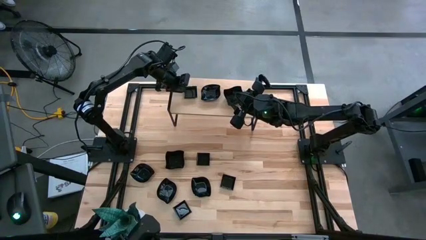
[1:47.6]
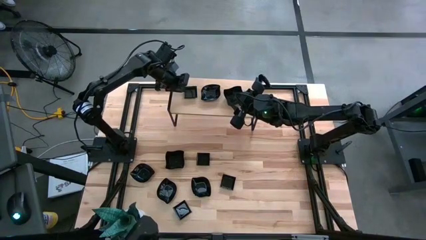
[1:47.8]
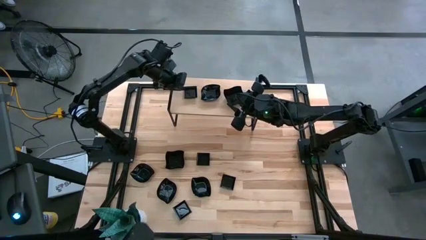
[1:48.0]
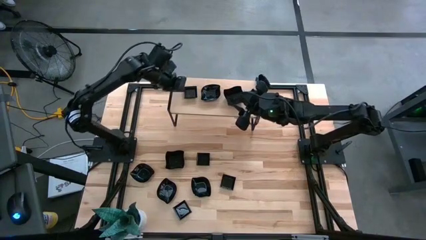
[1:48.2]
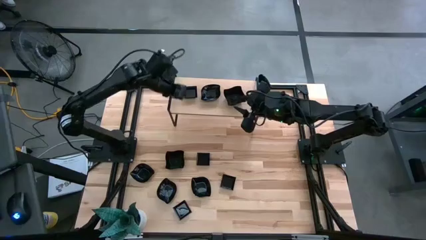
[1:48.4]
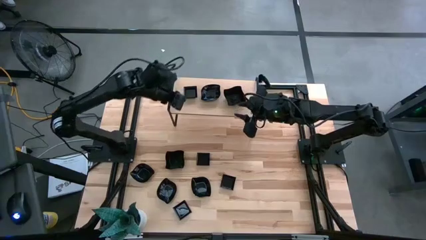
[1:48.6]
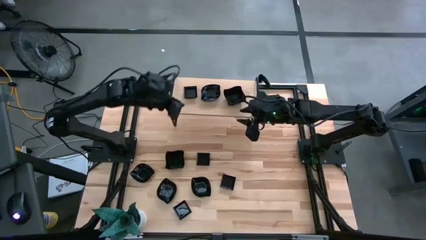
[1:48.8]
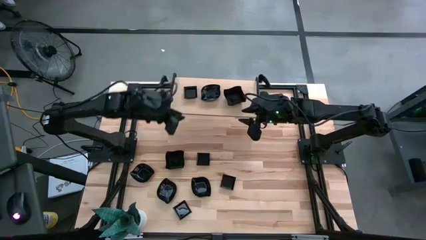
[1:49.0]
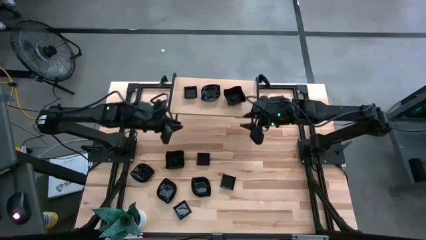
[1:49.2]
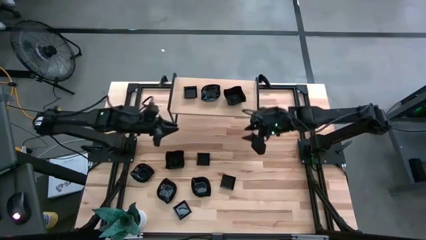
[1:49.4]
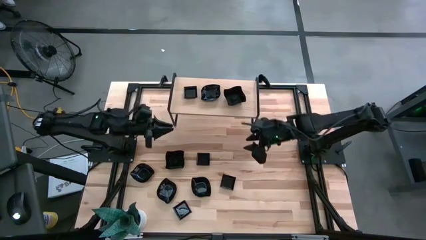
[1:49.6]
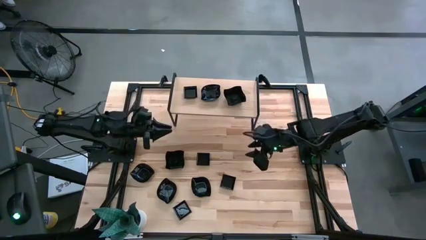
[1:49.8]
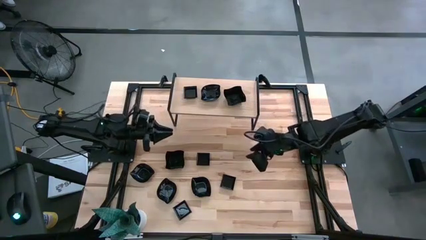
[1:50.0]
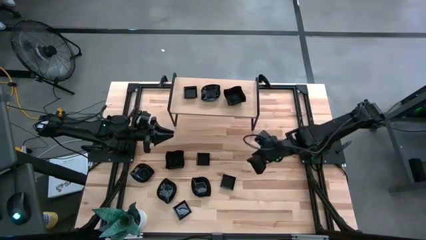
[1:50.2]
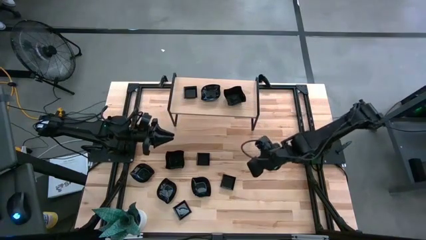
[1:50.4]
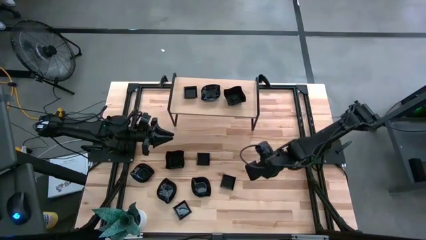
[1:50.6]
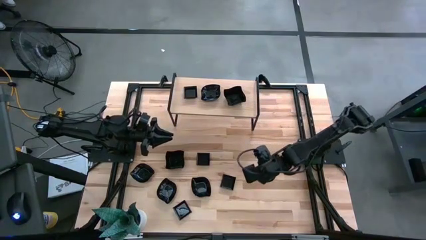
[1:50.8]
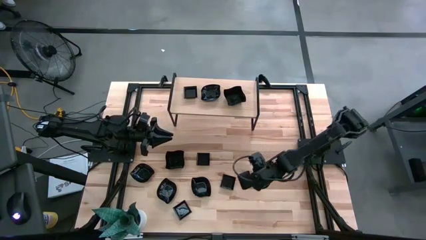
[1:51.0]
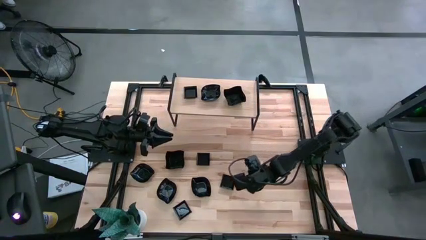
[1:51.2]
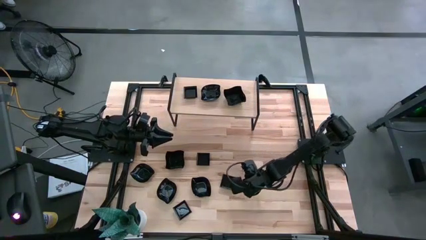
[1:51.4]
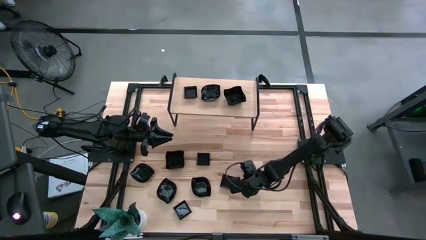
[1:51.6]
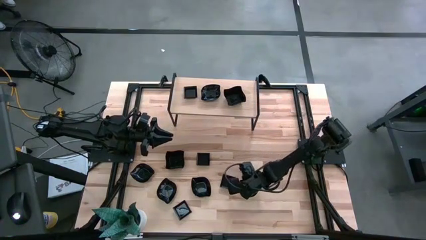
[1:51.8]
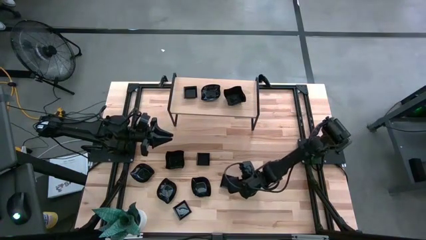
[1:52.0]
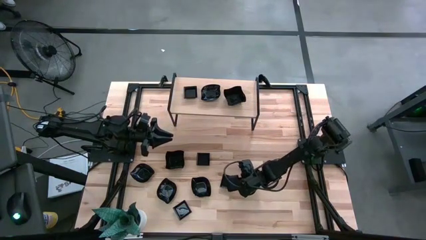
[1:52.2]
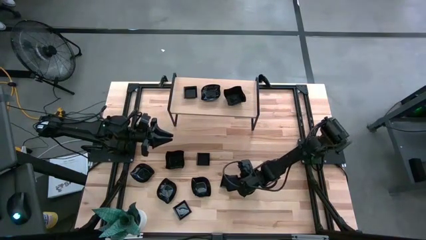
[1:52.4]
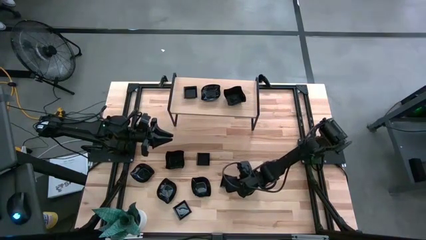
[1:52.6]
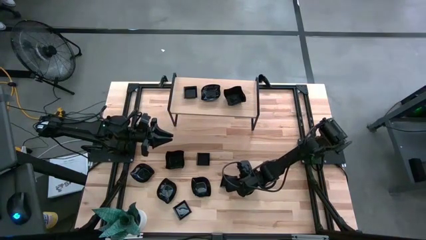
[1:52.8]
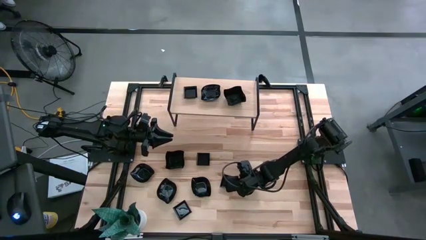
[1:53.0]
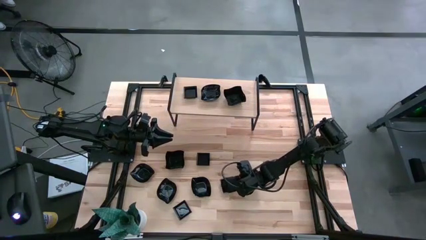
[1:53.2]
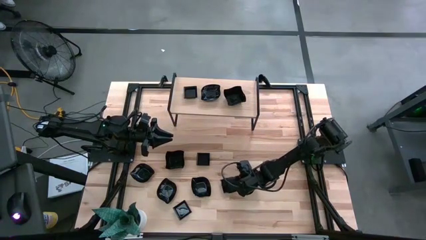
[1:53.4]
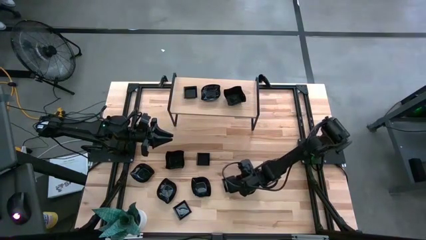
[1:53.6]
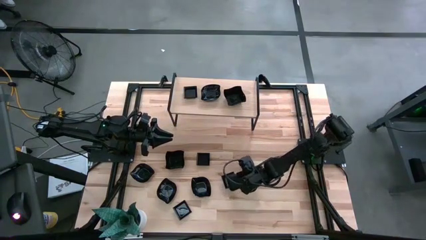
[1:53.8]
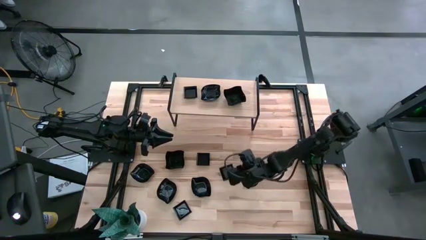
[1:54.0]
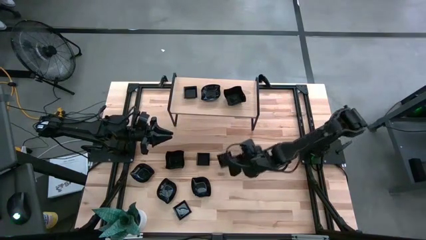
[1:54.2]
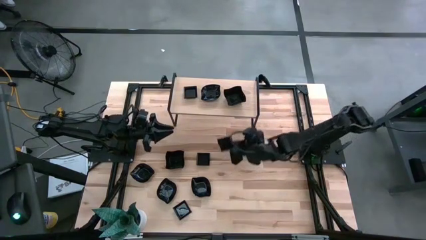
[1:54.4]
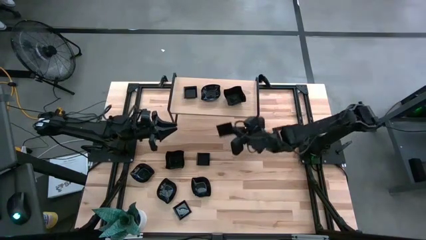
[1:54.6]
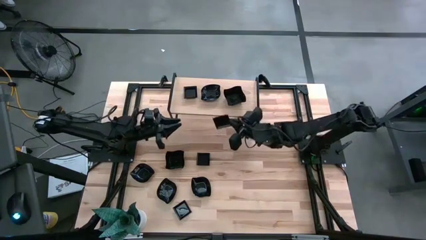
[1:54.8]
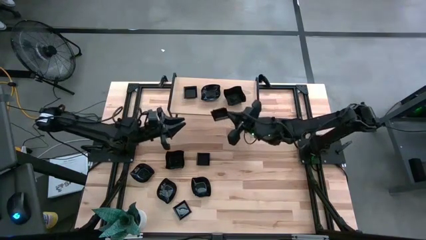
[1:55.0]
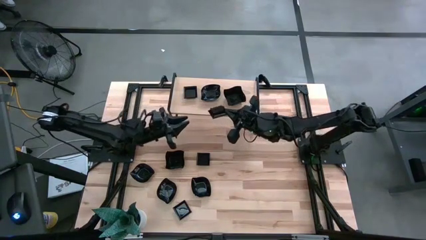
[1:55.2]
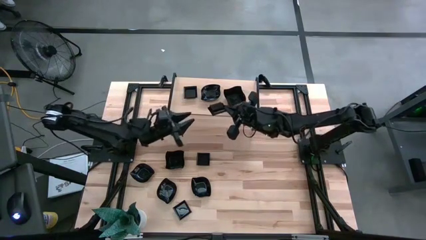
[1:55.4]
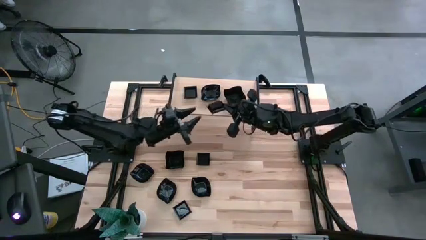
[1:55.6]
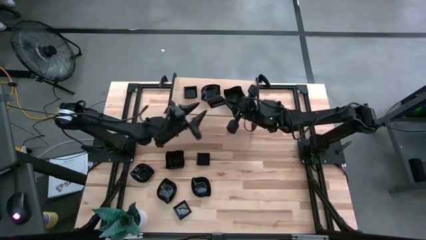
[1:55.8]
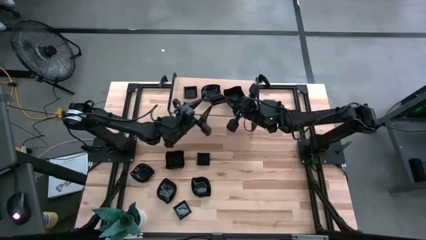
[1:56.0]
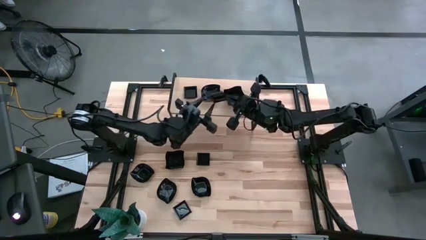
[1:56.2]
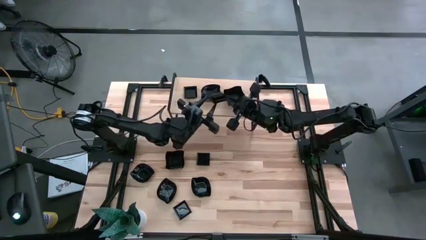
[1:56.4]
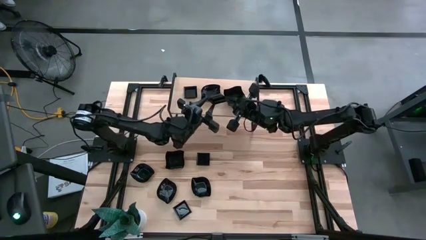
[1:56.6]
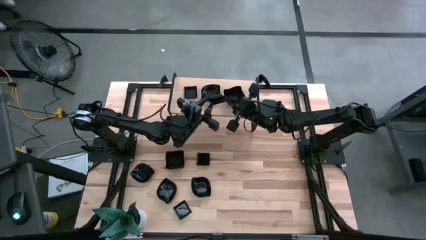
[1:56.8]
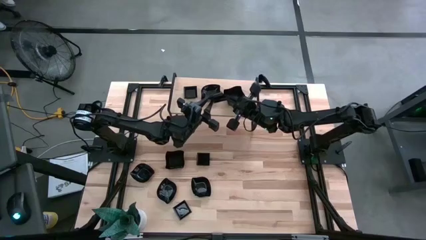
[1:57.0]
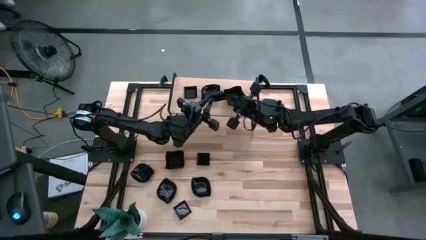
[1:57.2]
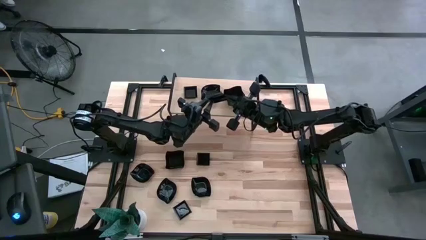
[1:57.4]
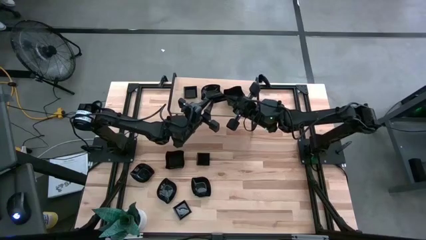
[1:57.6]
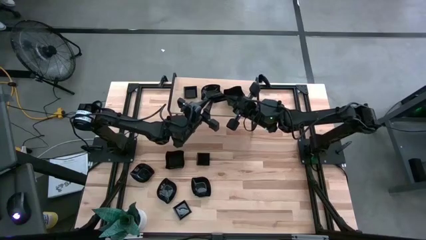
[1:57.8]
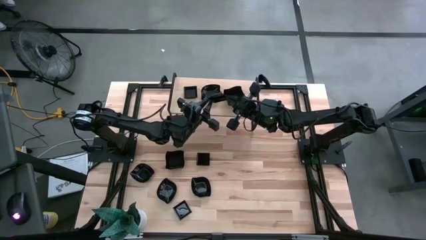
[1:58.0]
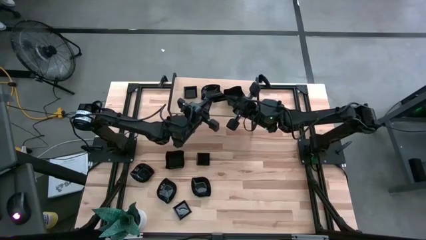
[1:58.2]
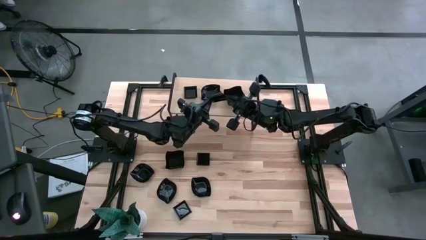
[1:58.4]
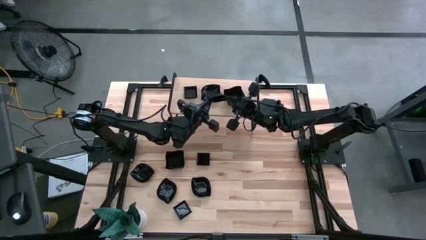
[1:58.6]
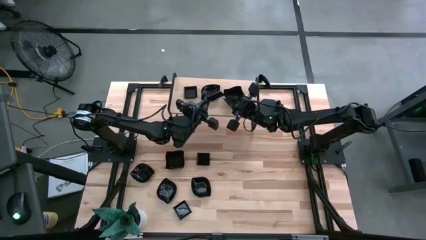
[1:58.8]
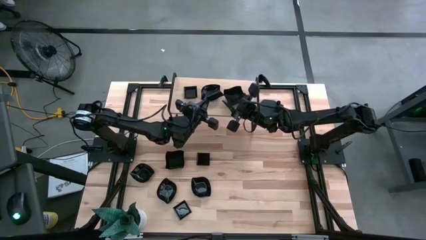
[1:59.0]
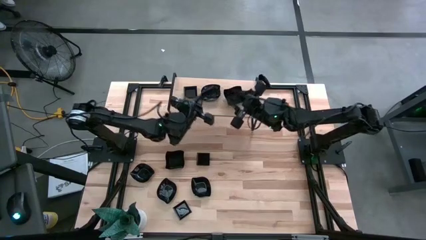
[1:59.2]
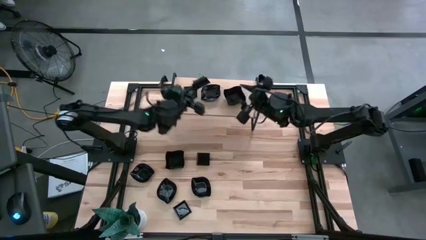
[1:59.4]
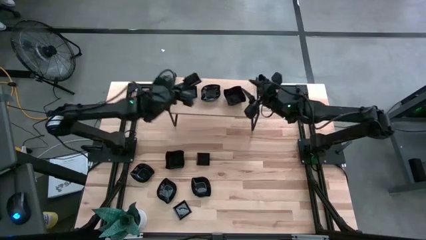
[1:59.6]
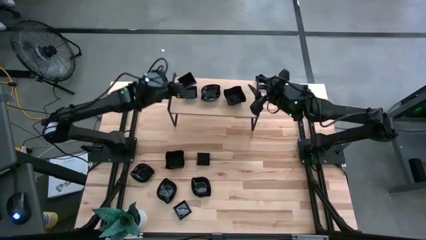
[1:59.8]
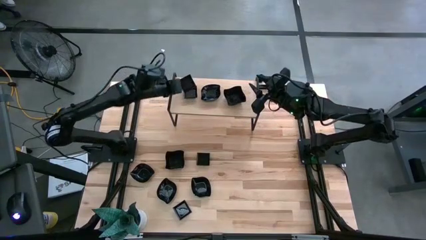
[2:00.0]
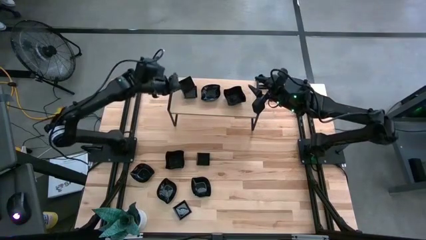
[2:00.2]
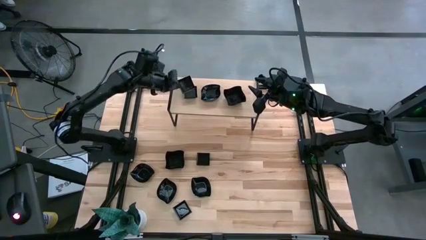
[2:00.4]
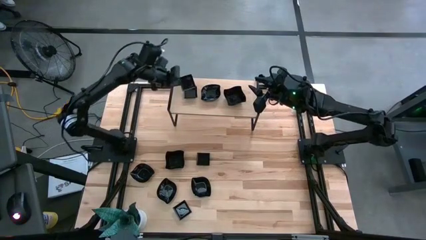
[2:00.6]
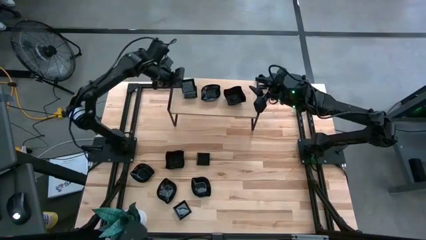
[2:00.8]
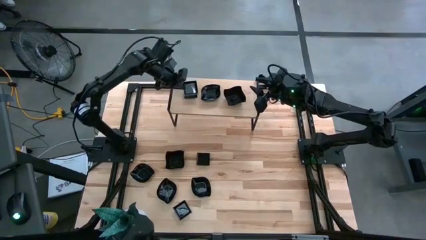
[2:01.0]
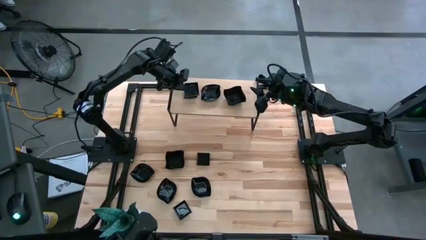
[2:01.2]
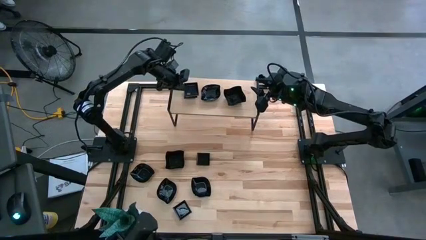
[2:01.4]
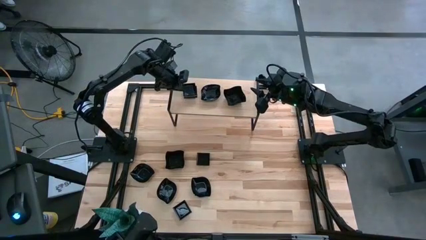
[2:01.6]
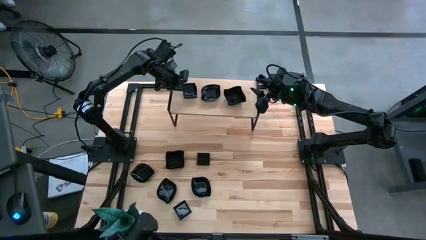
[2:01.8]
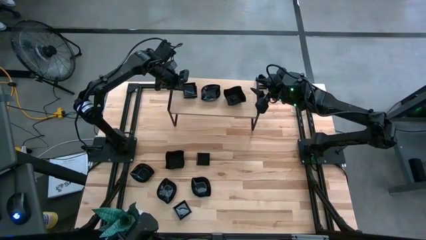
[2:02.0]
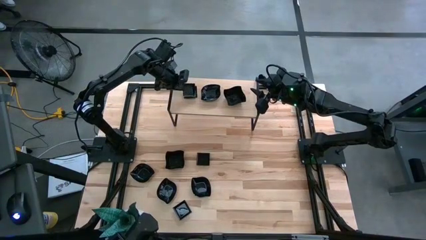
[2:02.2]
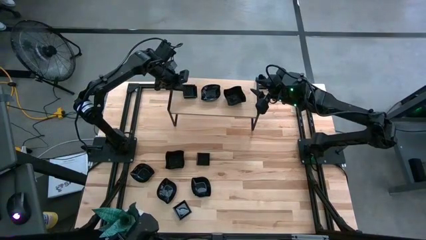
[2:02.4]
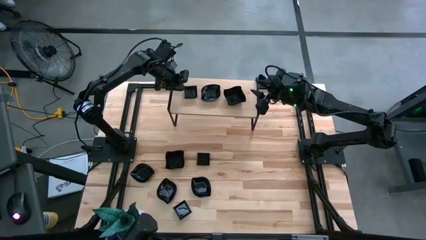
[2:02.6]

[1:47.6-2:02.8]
Task: Pick & Place Mini shaped plates
Stack the square-shaped plate on the square-shaped plate
